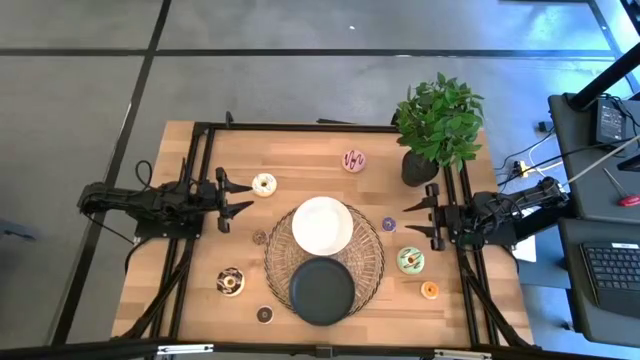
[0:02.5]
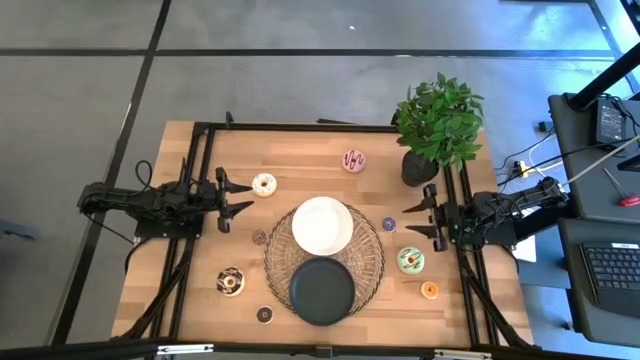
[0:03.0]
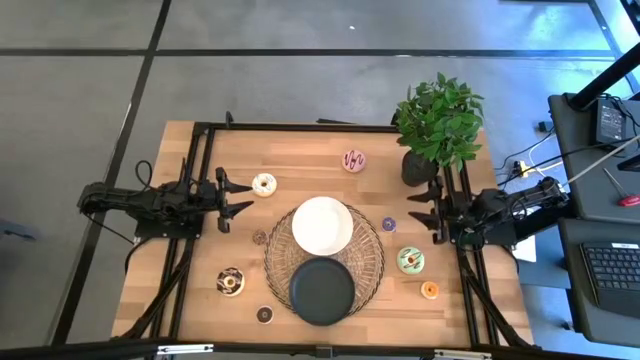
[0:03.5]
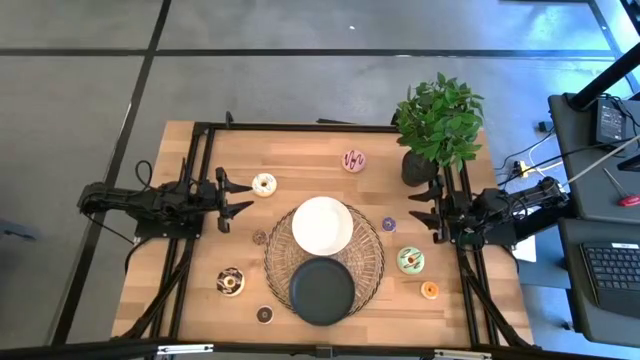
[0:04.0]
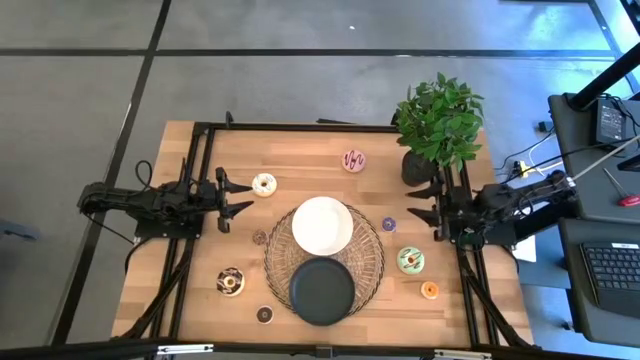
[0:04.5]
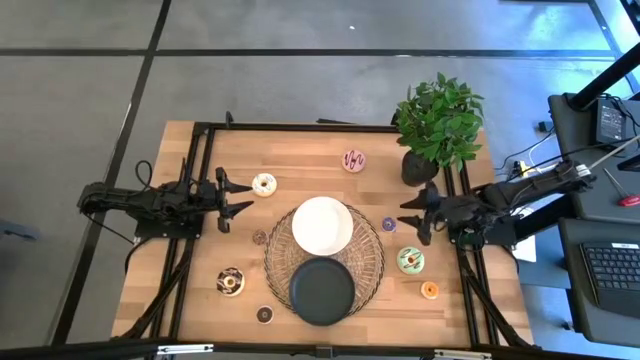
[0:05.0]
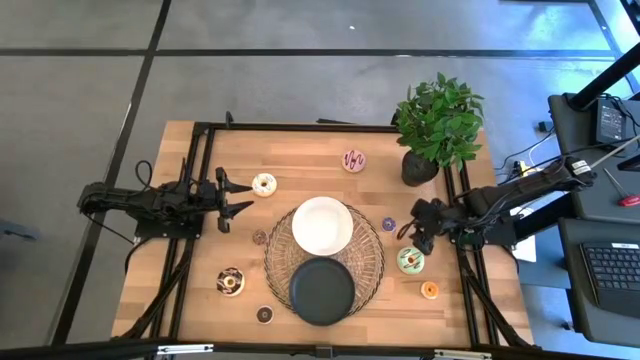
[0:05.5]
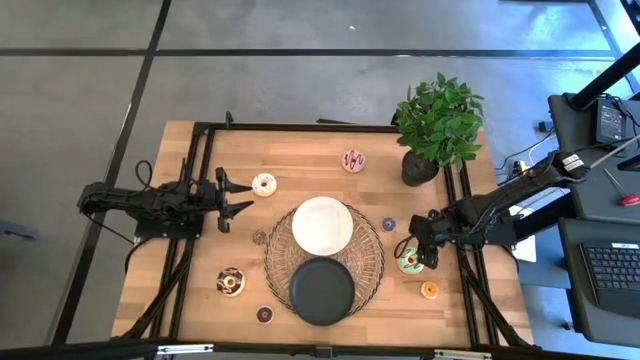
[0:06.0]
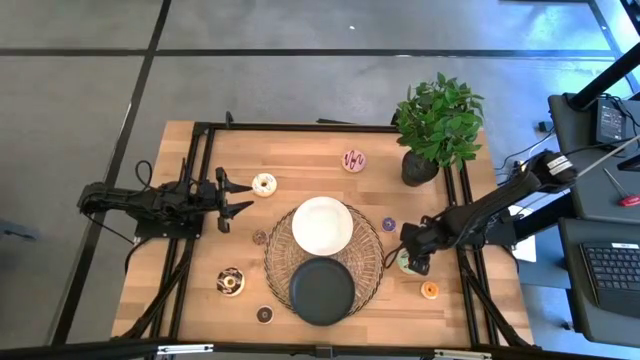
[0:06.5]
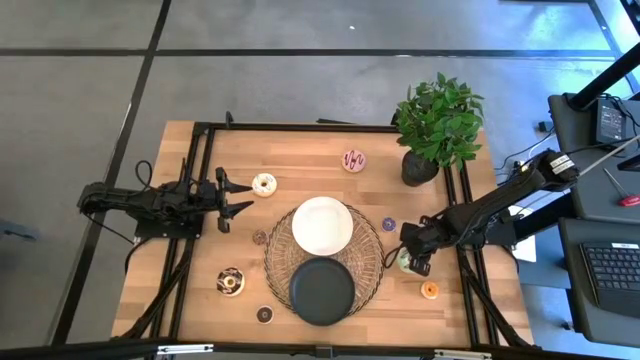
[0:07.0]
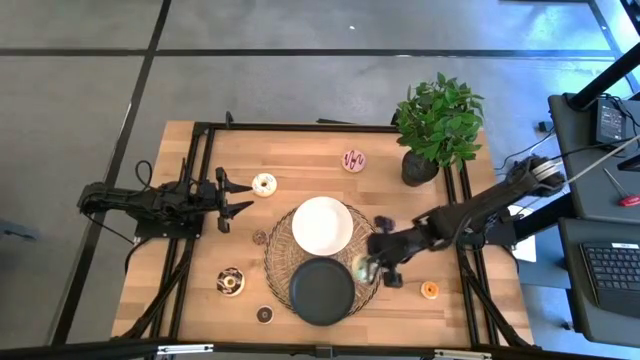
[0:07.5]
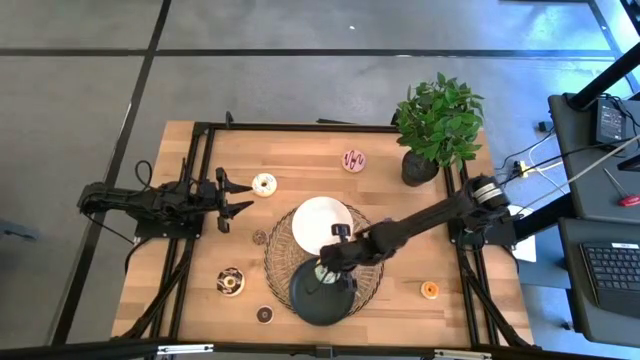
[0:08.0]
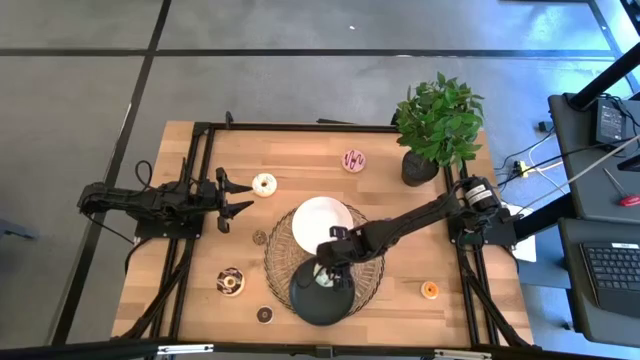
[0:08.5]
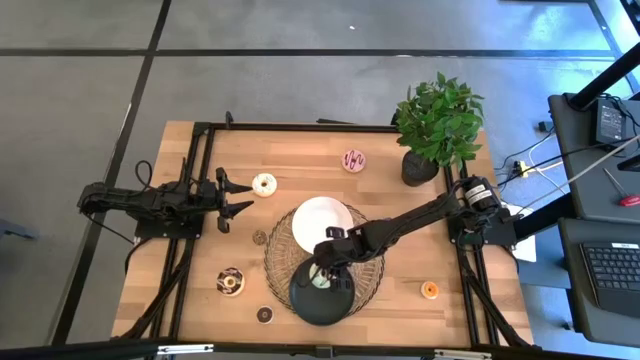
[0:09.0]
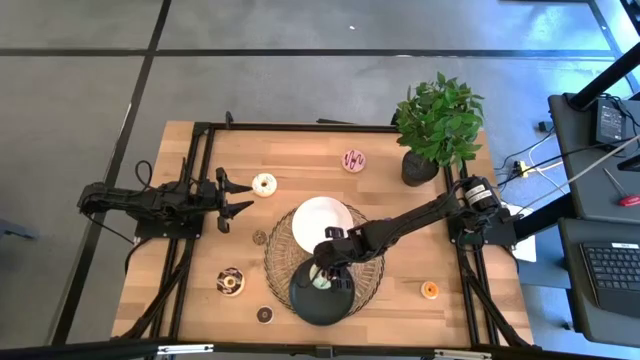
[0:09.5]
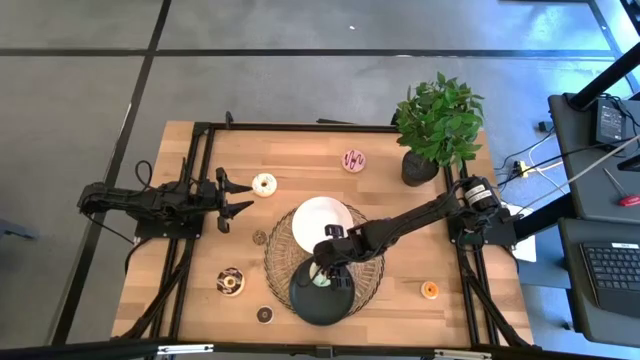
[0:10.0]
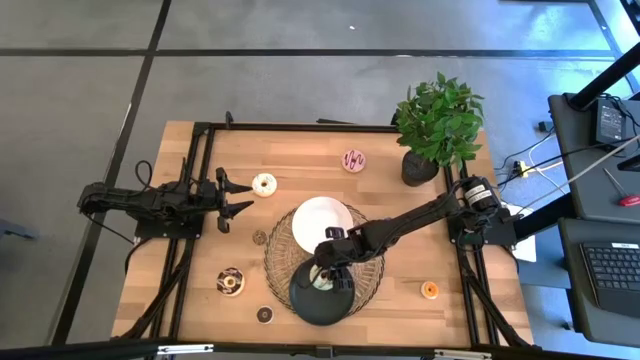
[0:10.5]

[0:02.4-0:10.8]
Task: Pick & Place donuts
Put the big light blue doughnut on the black plate

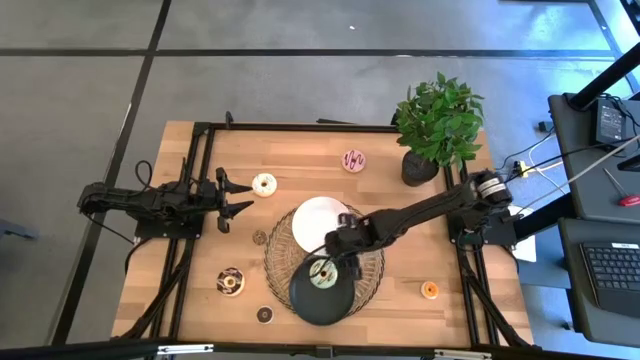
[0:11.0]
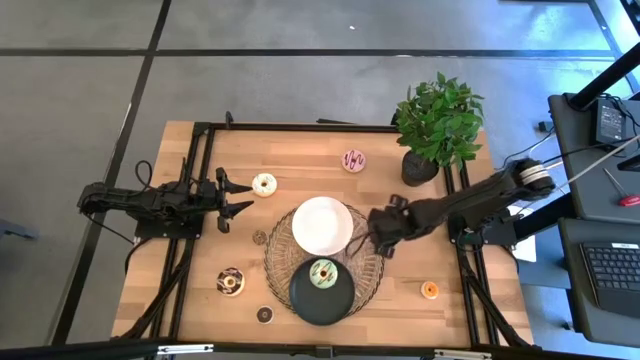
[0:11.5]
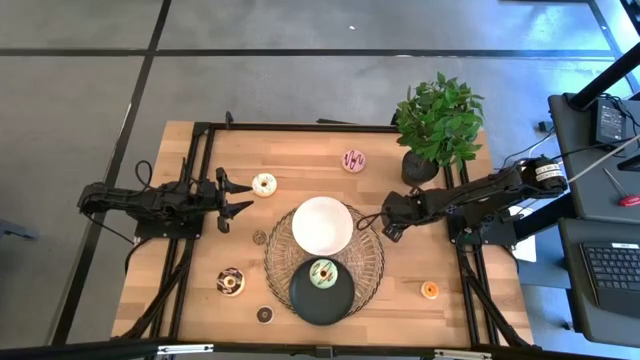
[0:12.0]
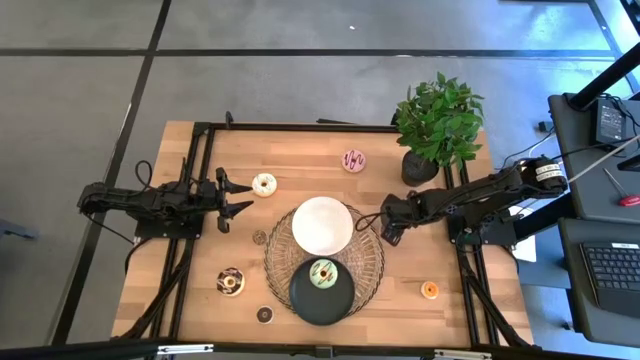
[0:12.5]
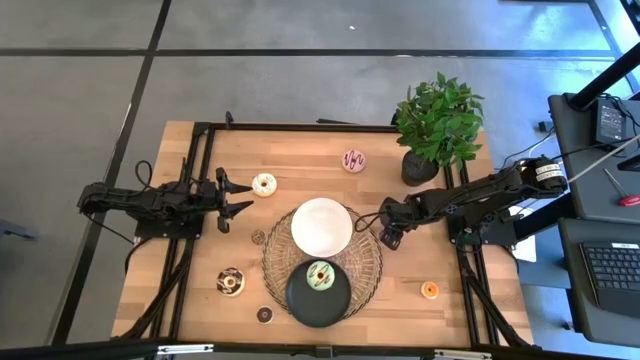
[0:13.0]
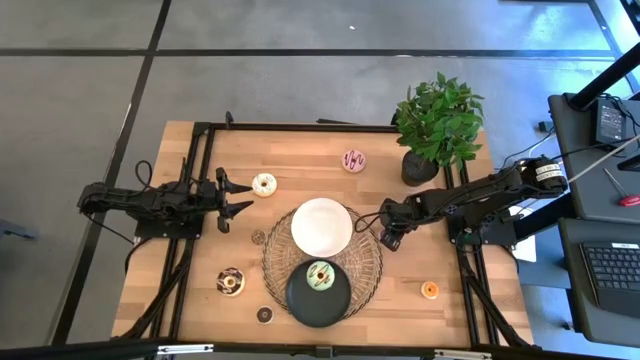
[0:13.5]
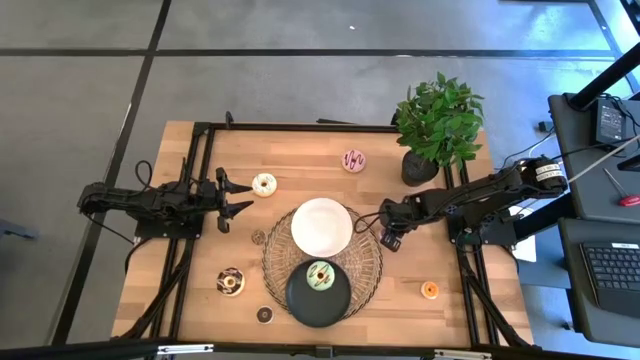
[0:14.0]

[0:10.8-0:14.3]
Put the small blue doughnut on the white plate

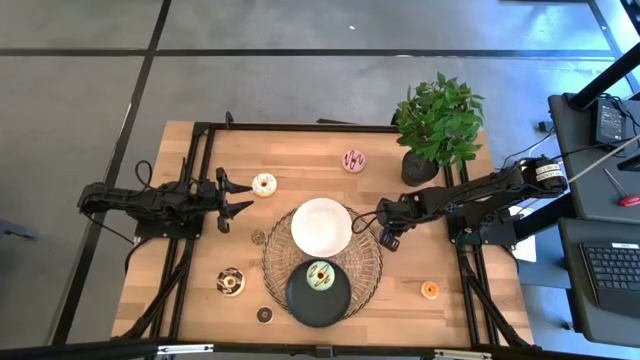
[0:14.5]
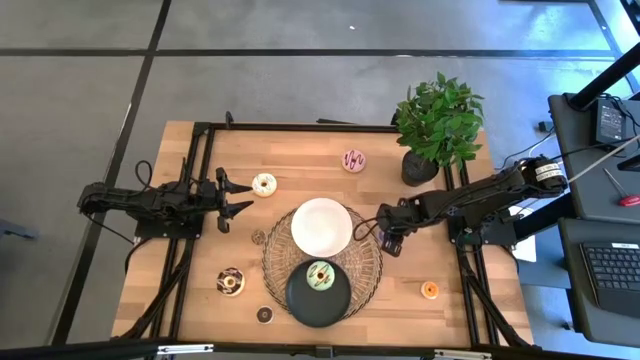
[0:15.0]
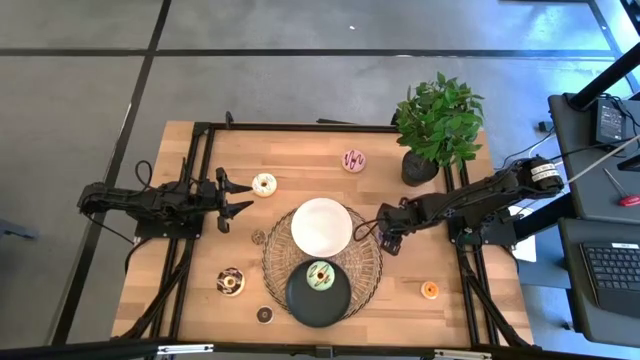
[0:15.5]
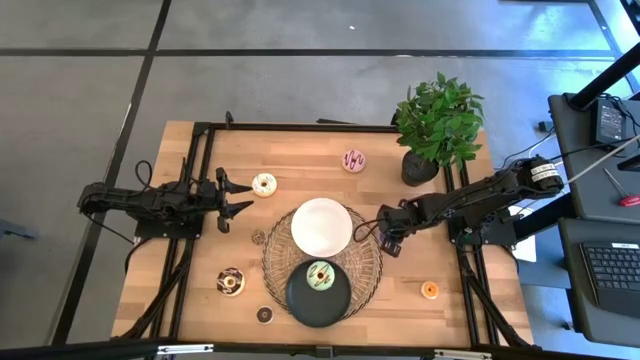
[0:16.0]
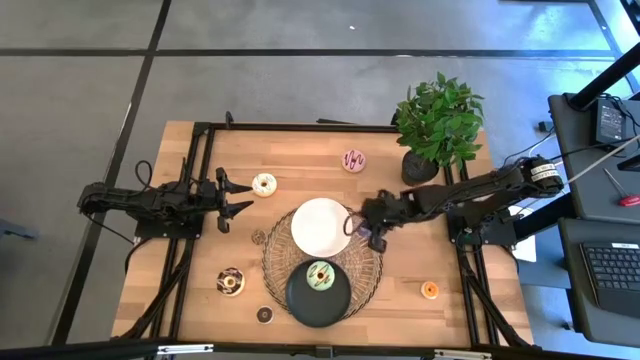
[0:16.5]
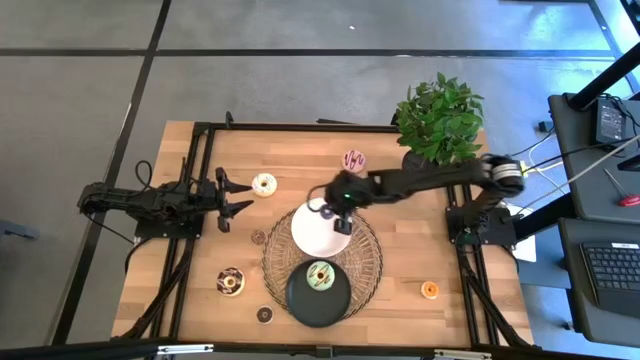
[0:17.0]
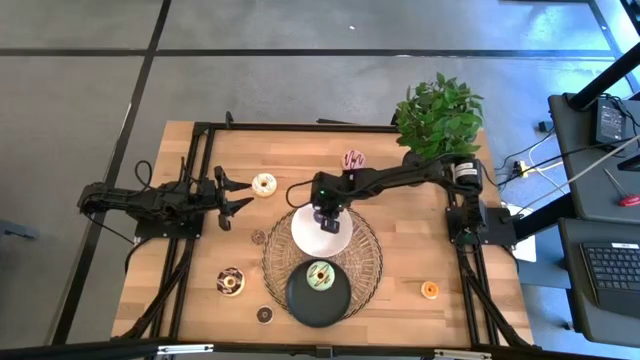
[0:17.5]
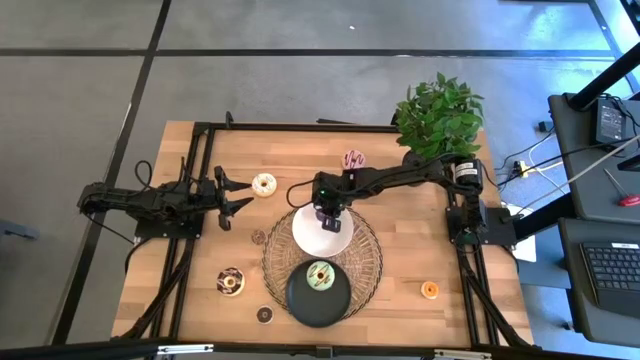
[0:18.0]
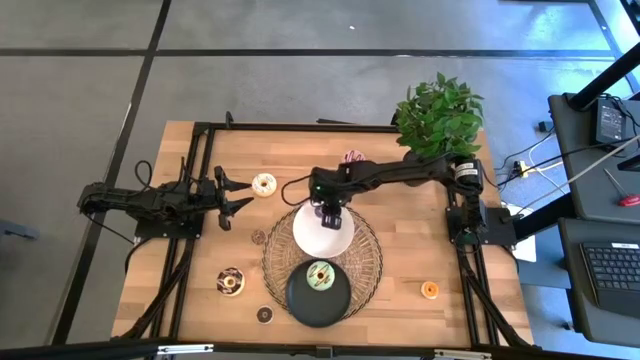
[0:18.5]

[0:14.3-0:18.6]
Put the small blue doughnut on the white plate
